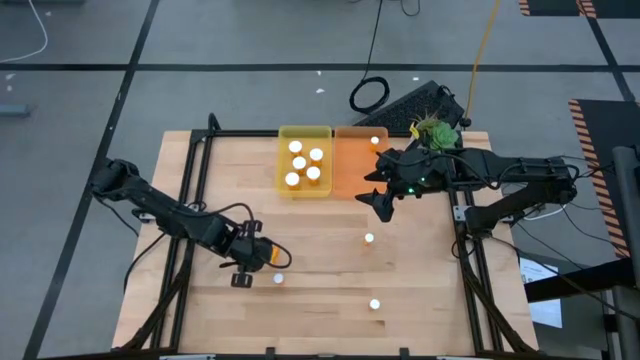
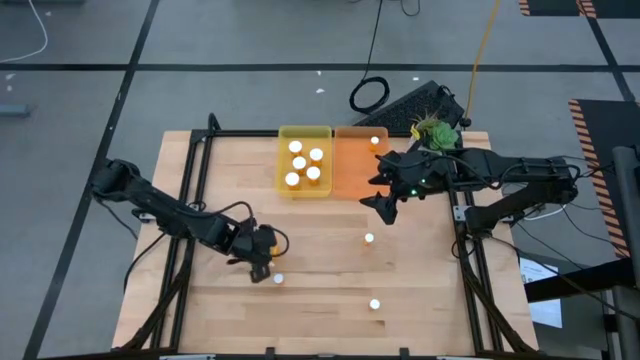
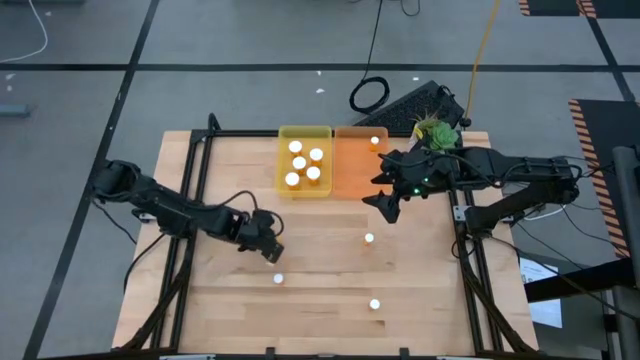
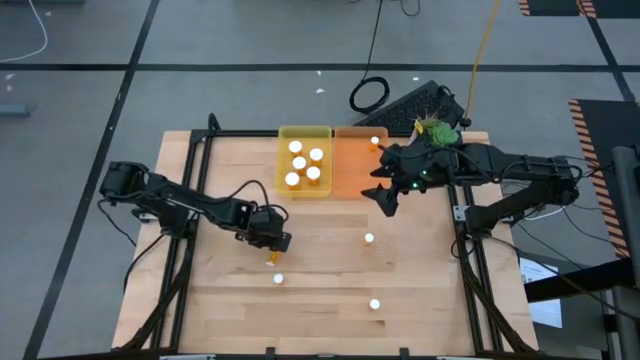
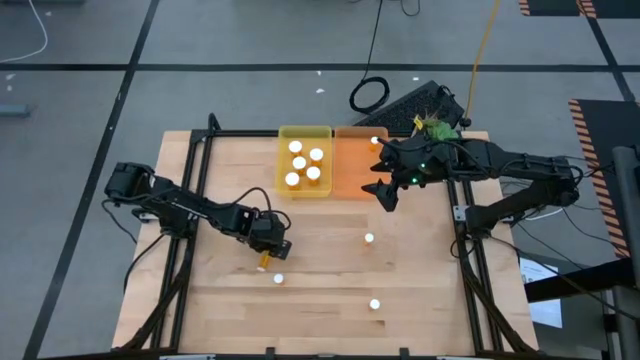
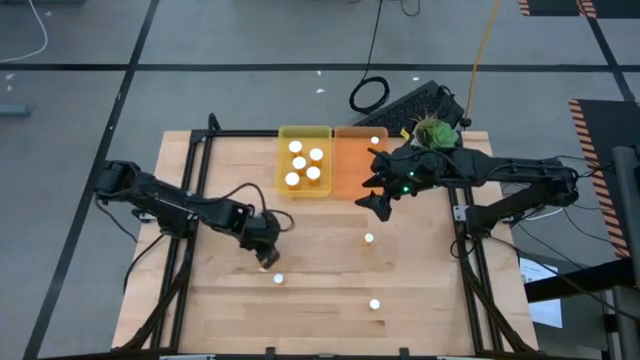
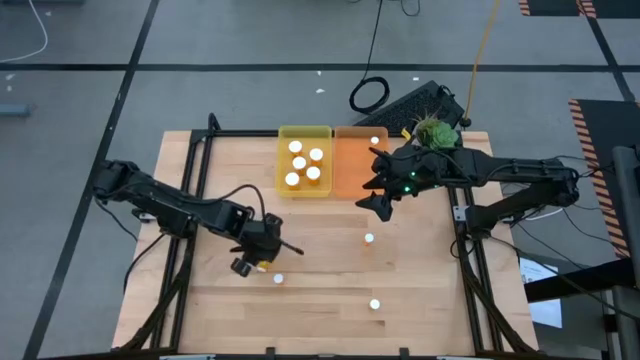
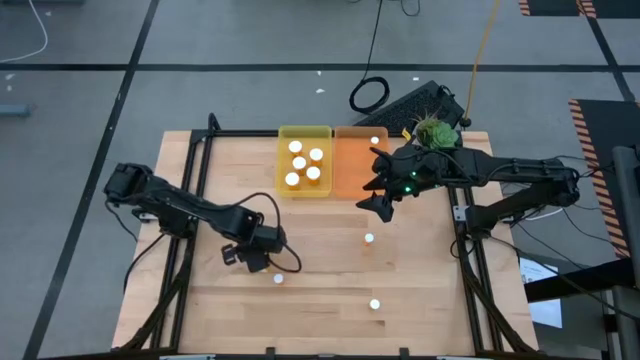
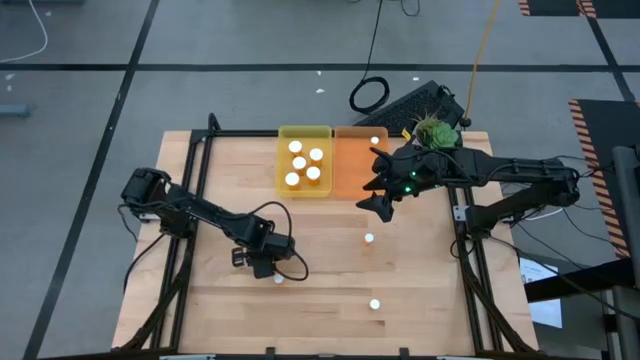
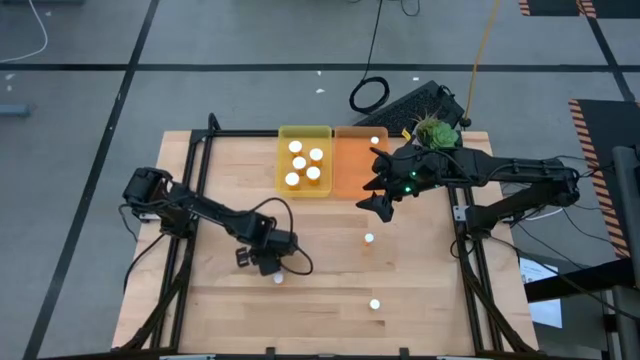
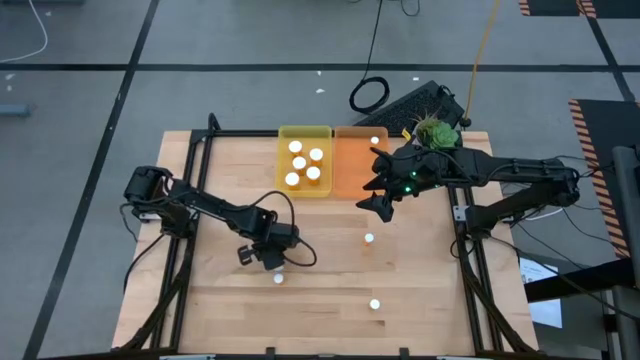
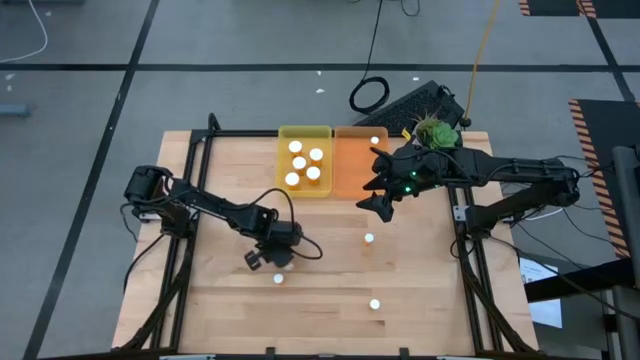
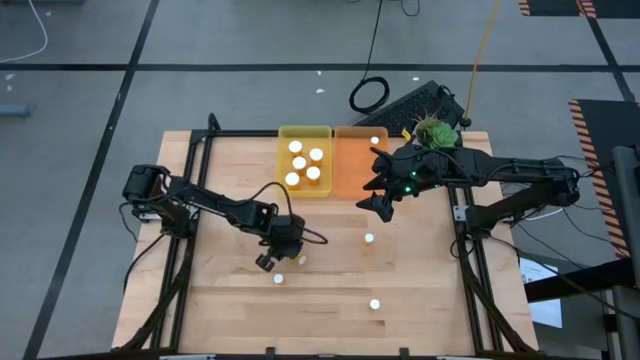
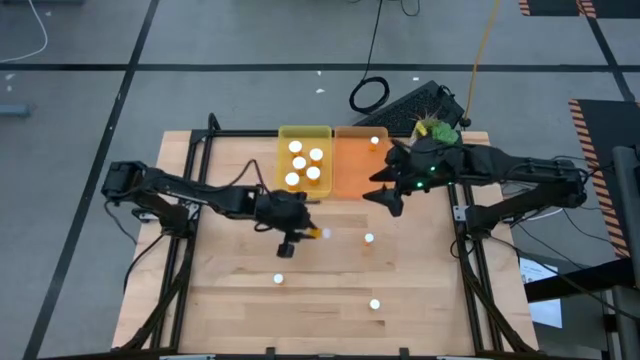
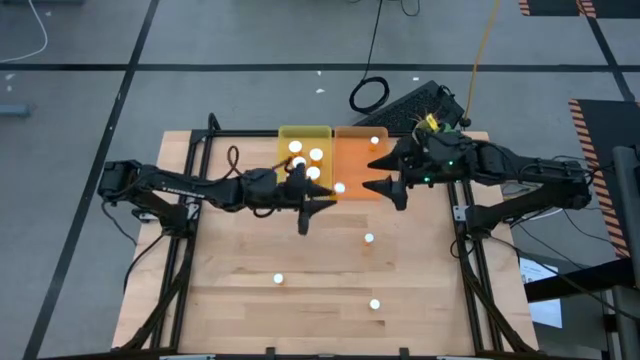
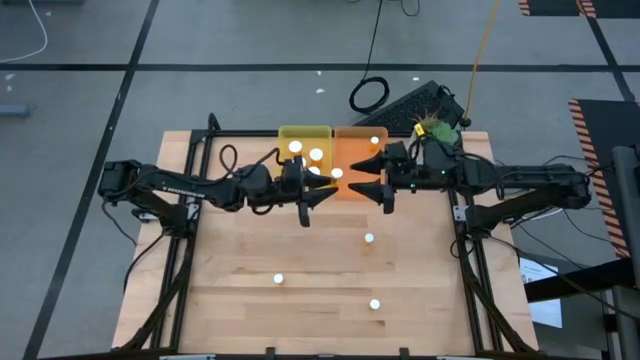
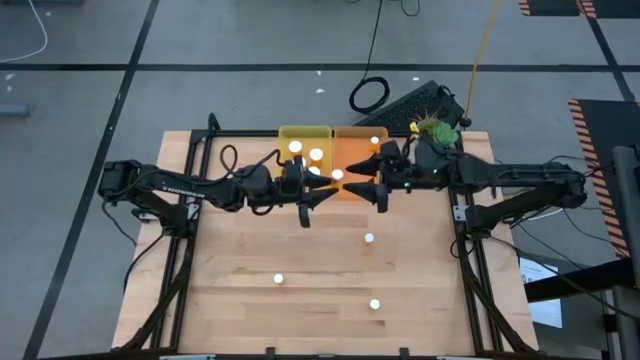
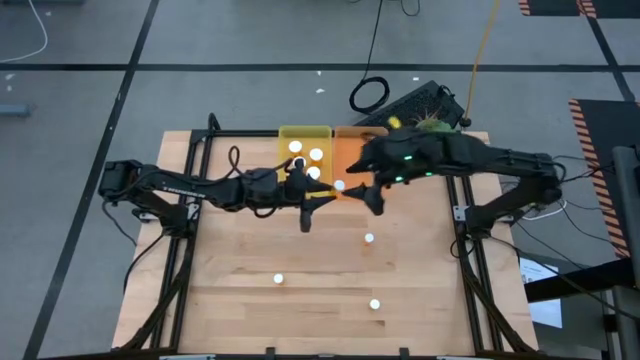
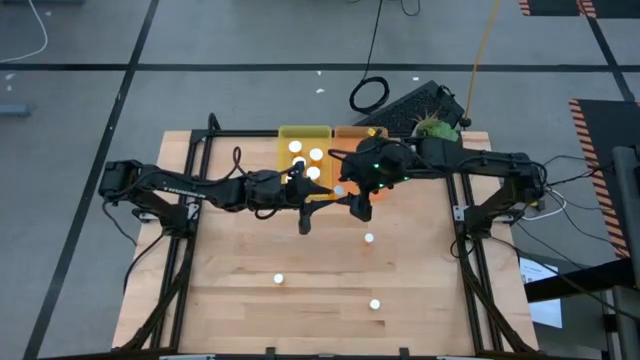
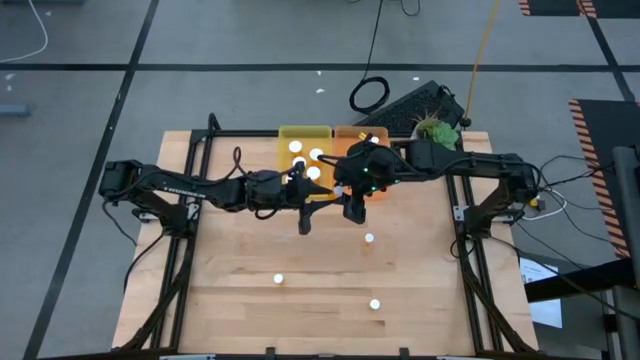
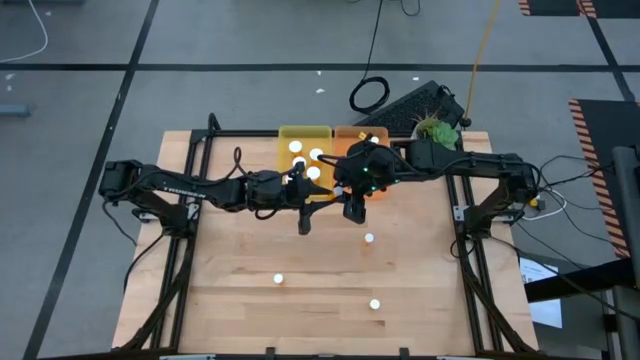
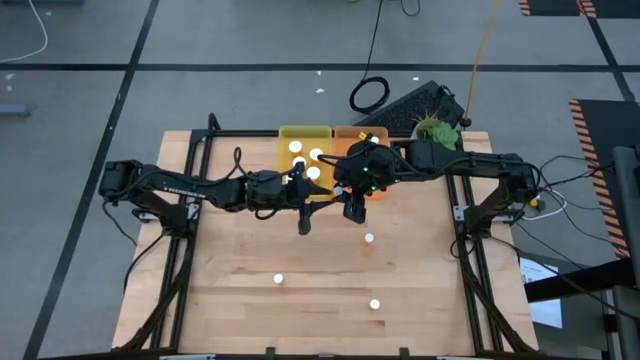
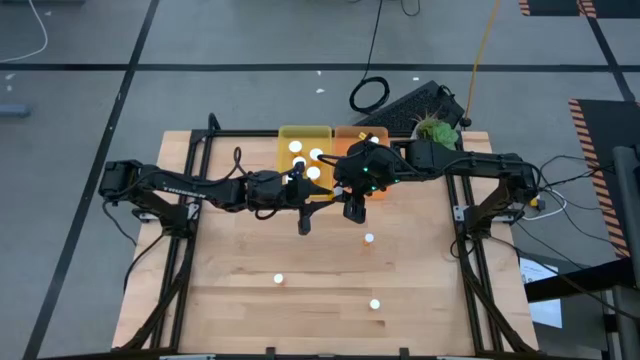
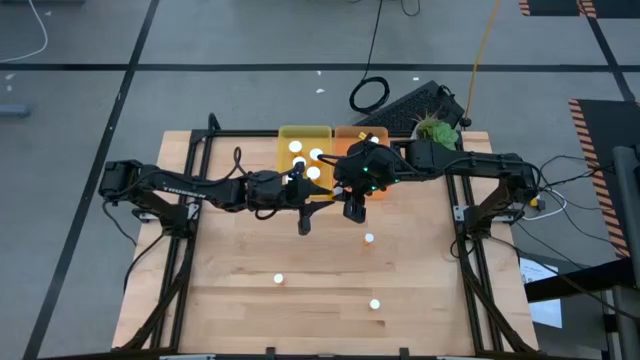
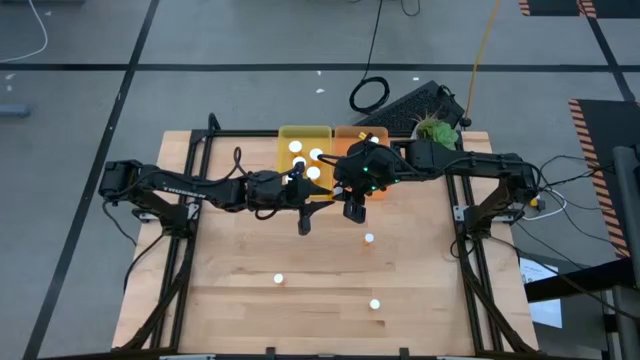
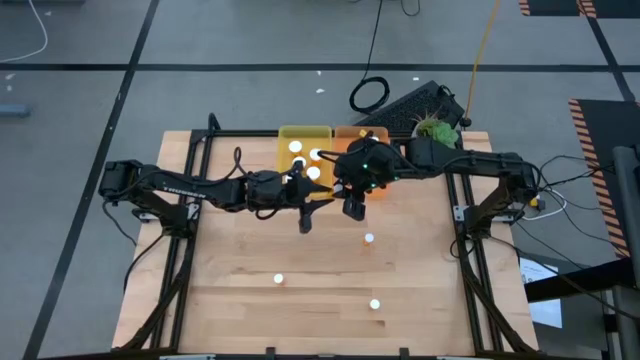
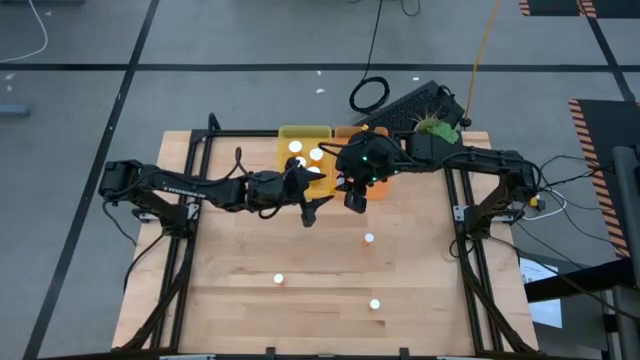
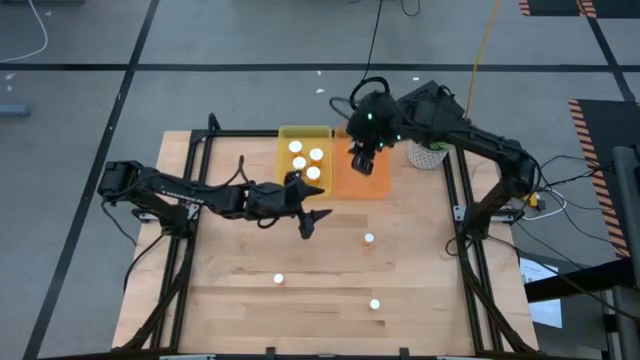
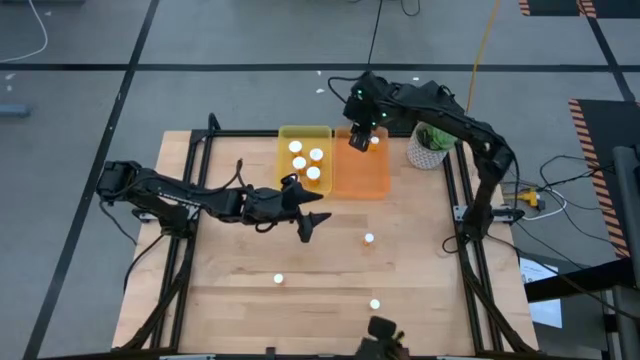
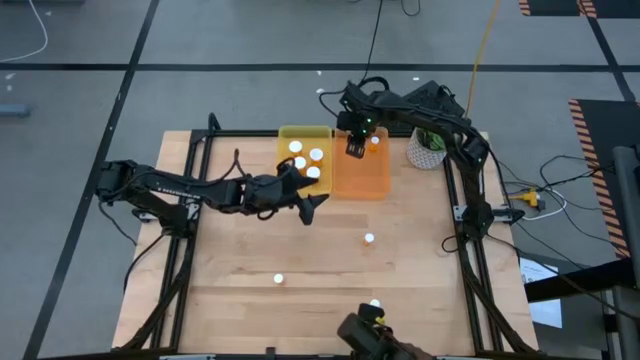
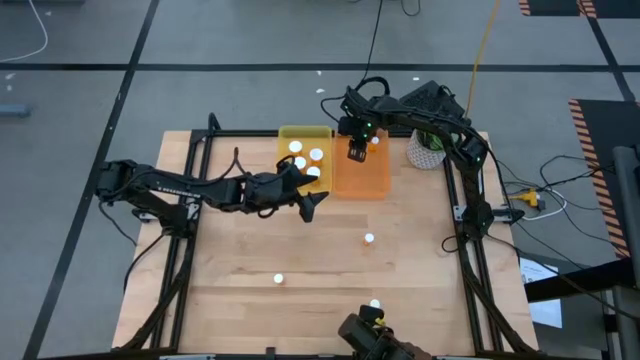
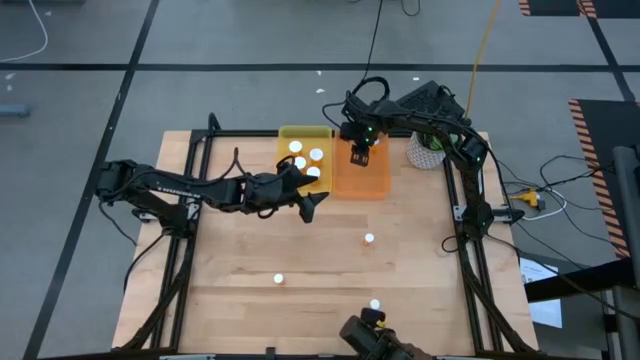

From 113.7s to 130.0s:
Task: Pick and place medicine bottles into bin by pill shape (circle, oval)
Put the small orange tablet bottle into the orange bin

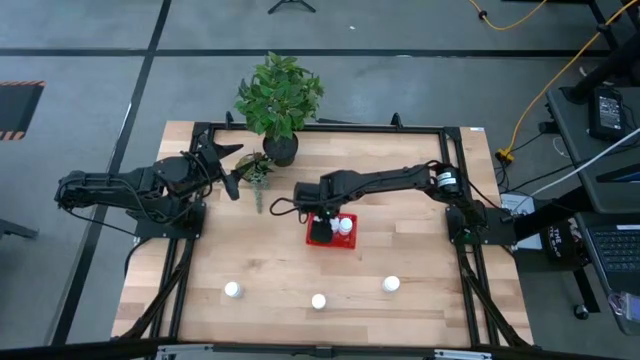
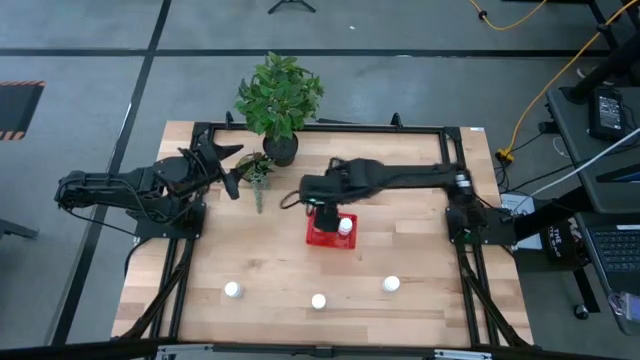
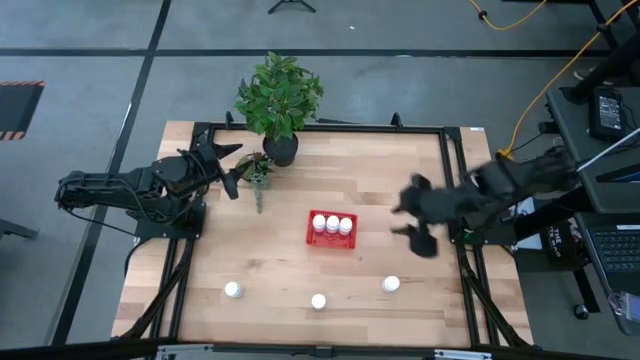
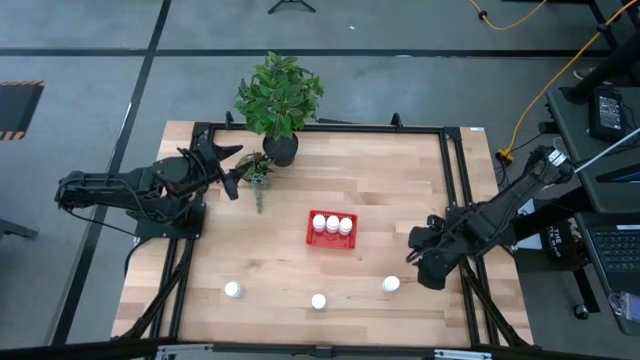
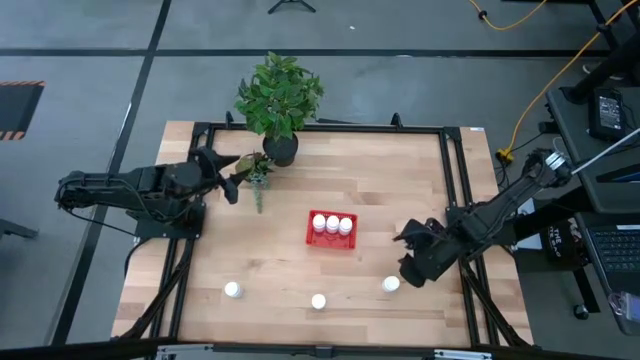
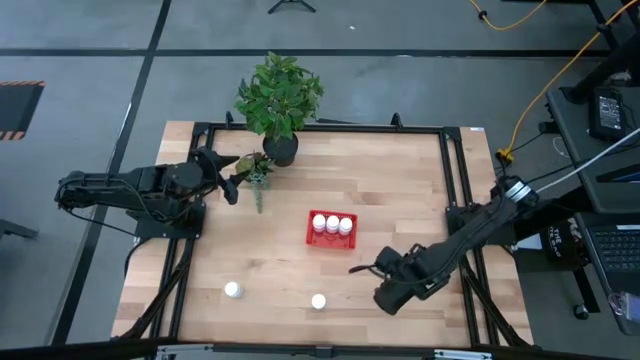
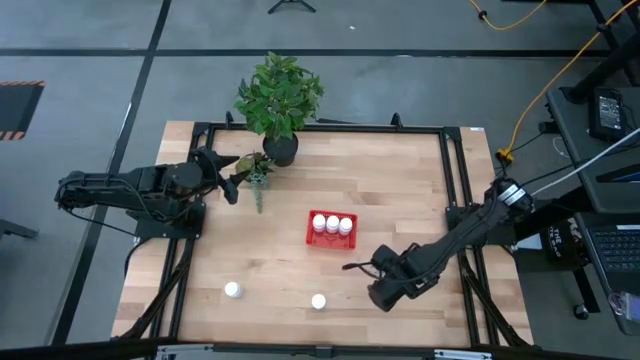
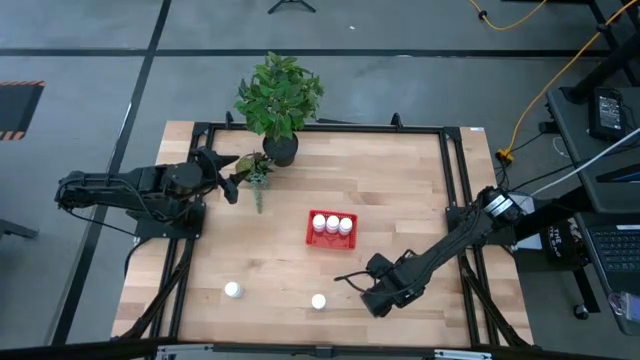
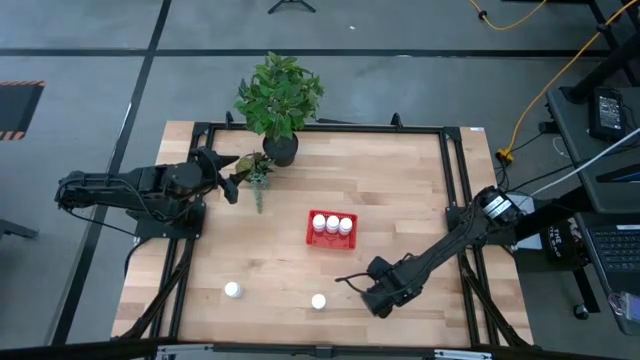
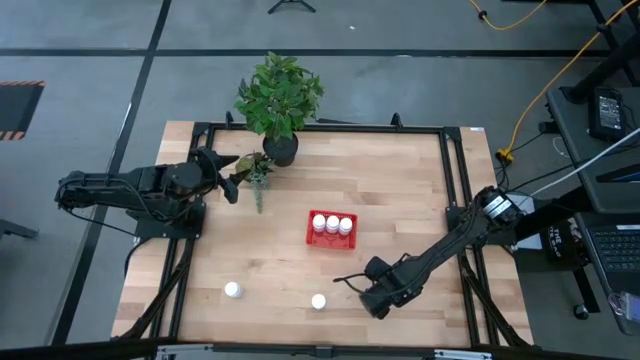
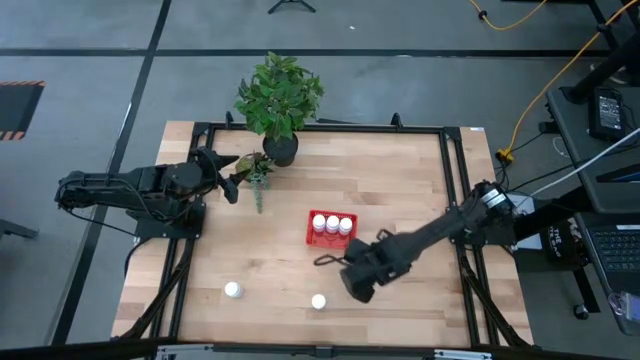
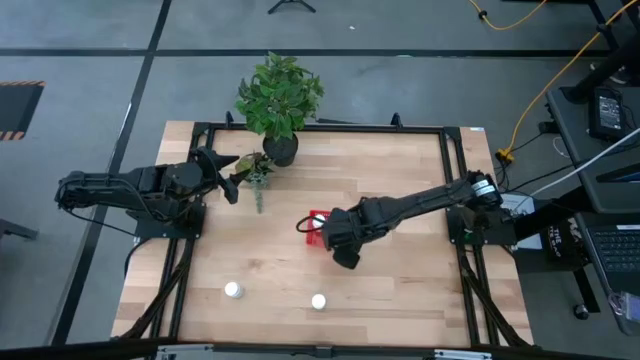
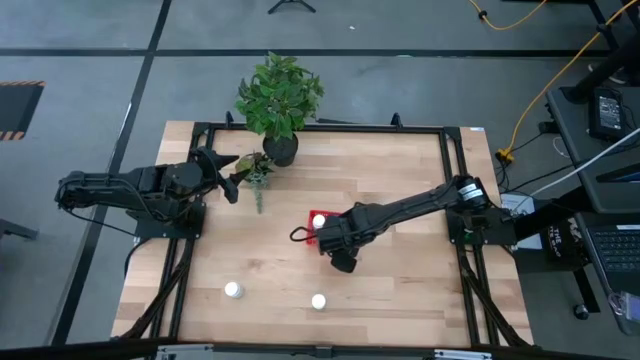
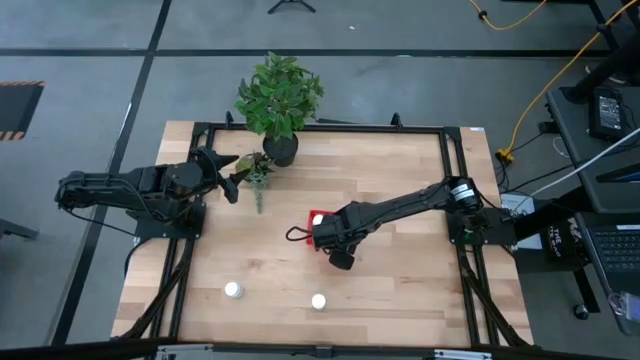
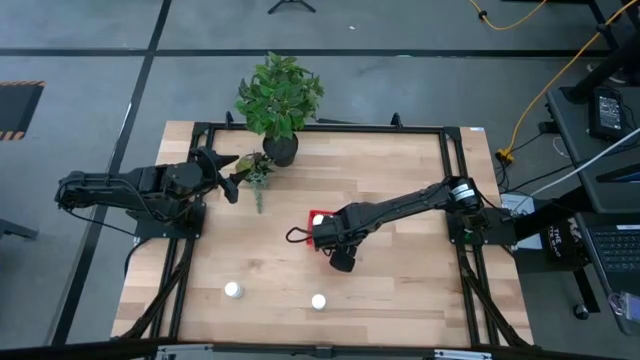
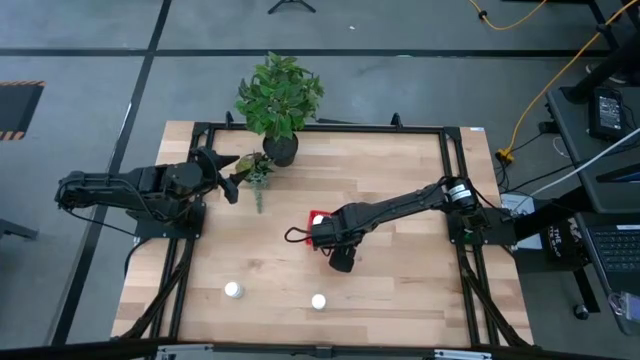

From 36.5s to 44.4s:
Task: Pick and place pill bottles into a basket
Put the white medicine bottle into the red basket
